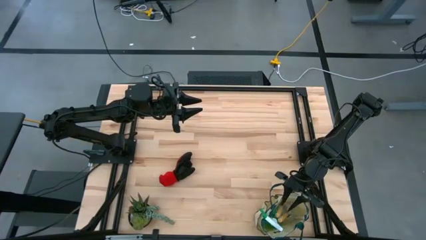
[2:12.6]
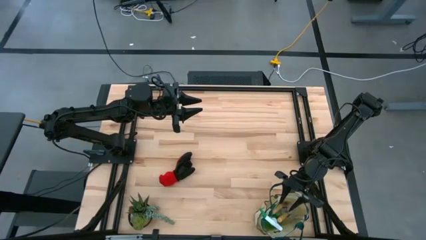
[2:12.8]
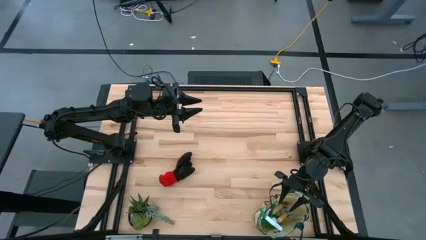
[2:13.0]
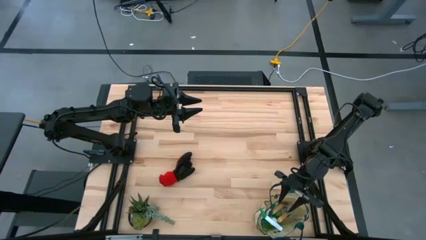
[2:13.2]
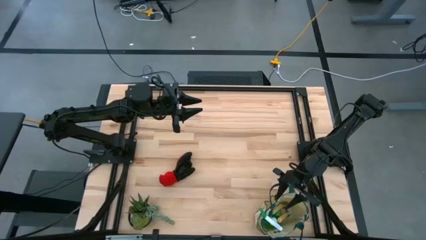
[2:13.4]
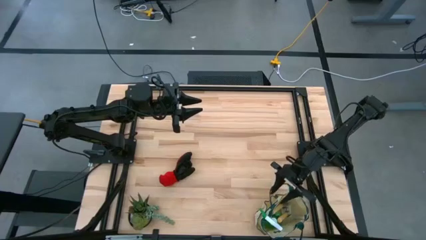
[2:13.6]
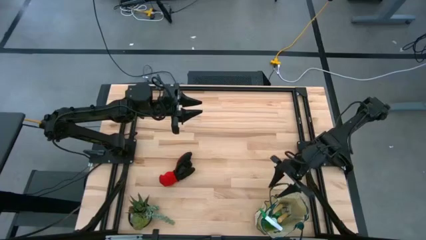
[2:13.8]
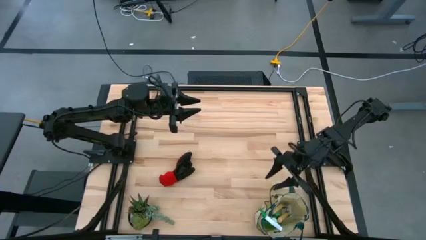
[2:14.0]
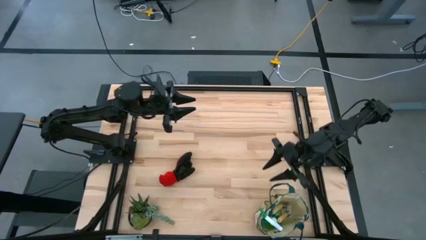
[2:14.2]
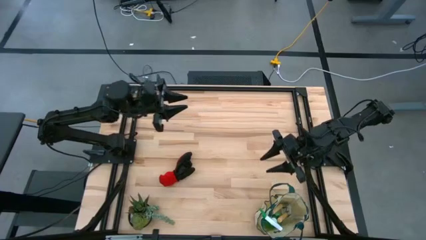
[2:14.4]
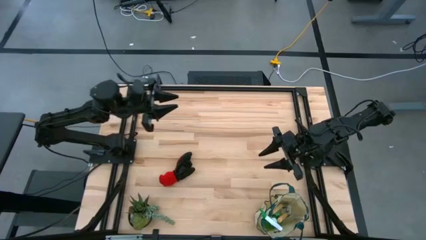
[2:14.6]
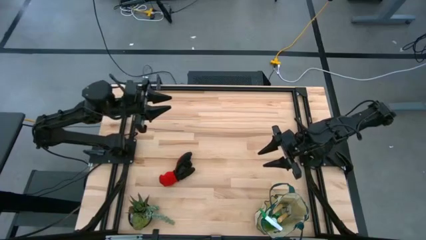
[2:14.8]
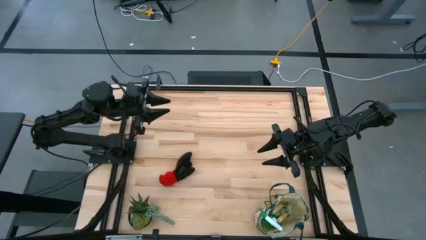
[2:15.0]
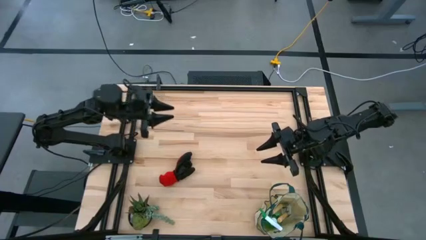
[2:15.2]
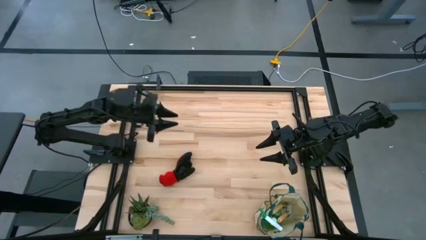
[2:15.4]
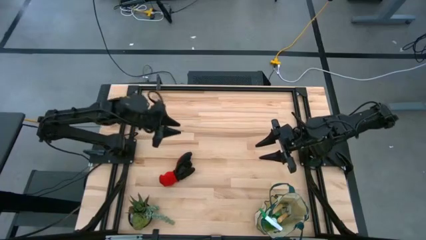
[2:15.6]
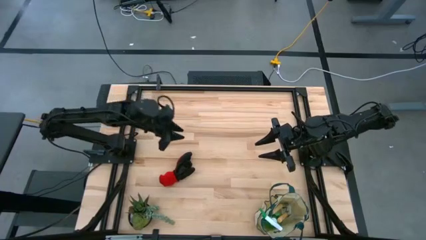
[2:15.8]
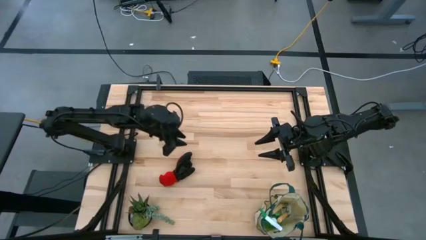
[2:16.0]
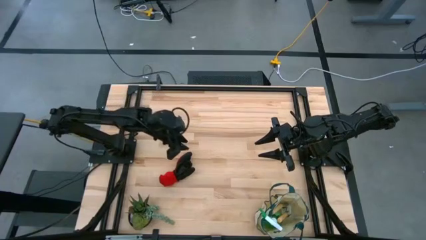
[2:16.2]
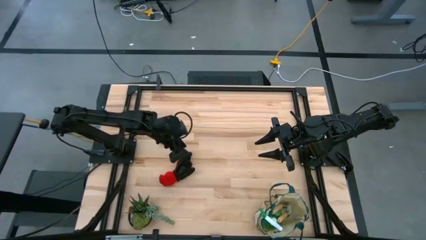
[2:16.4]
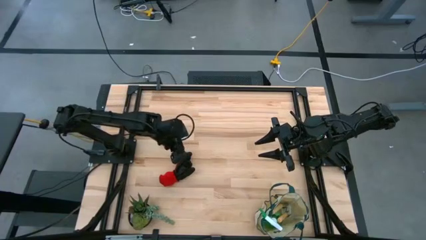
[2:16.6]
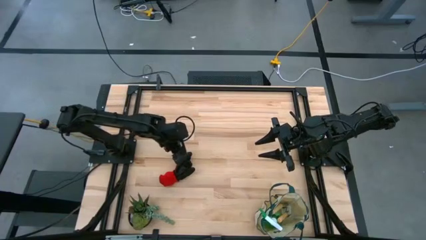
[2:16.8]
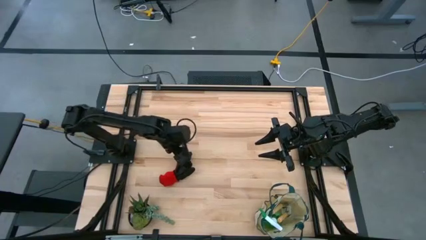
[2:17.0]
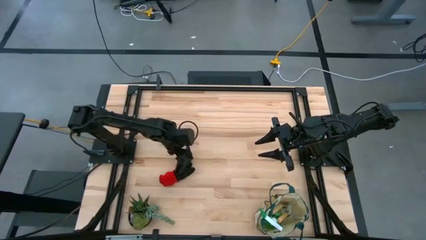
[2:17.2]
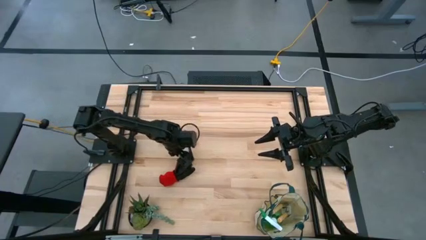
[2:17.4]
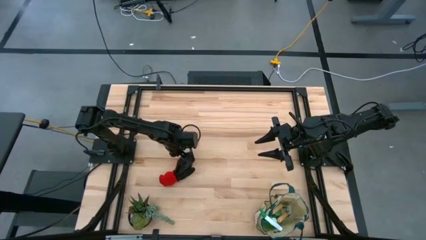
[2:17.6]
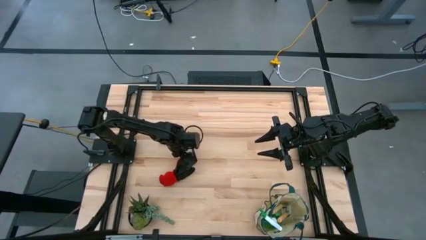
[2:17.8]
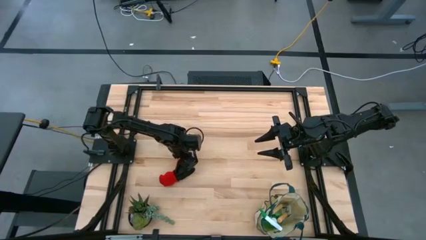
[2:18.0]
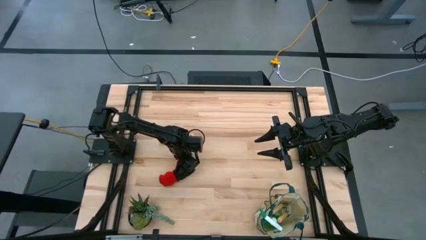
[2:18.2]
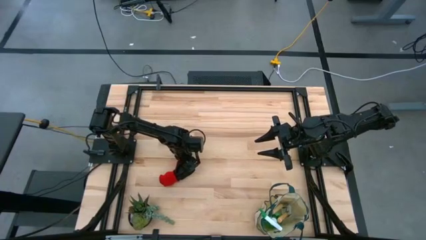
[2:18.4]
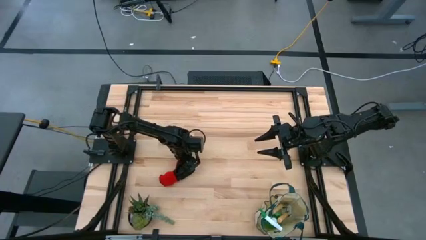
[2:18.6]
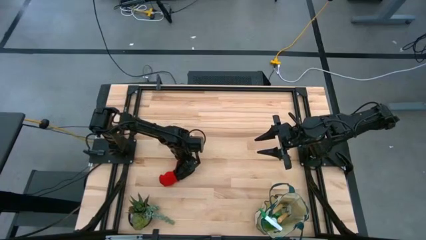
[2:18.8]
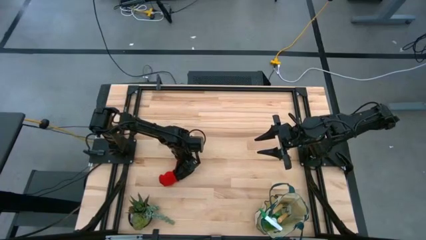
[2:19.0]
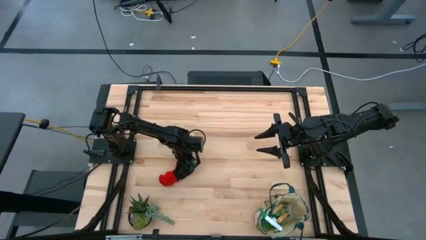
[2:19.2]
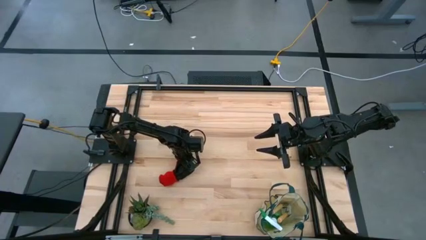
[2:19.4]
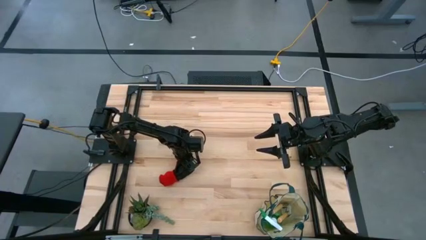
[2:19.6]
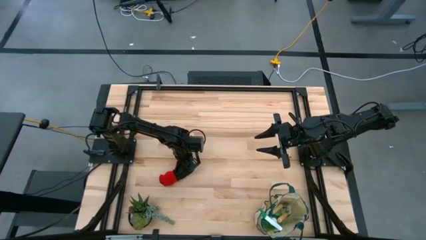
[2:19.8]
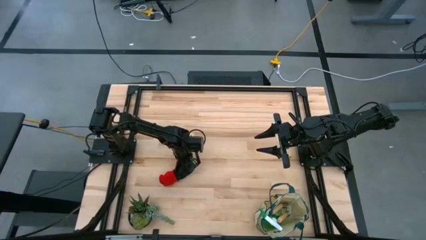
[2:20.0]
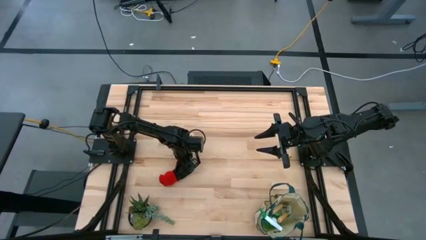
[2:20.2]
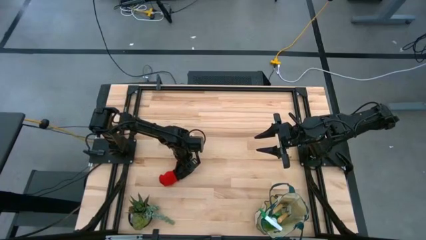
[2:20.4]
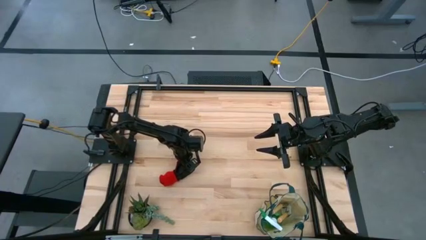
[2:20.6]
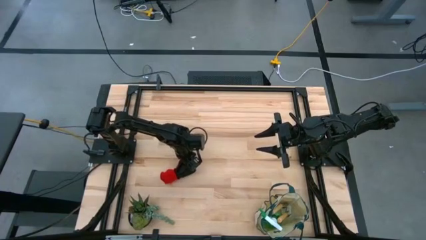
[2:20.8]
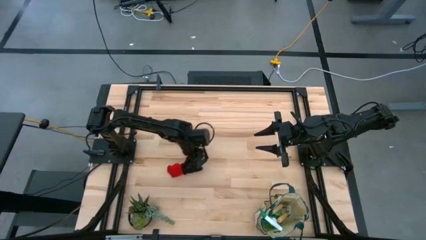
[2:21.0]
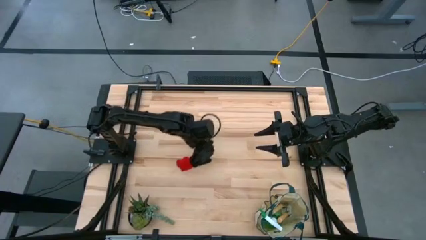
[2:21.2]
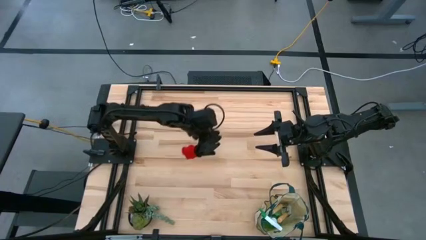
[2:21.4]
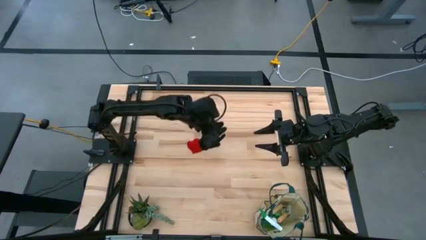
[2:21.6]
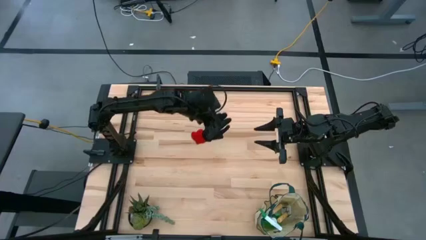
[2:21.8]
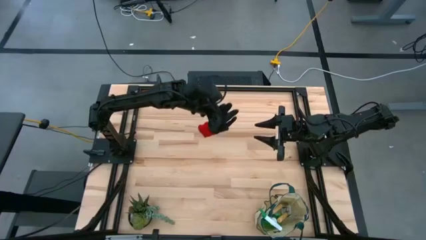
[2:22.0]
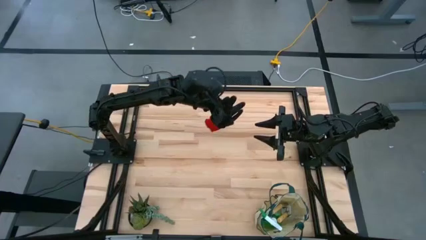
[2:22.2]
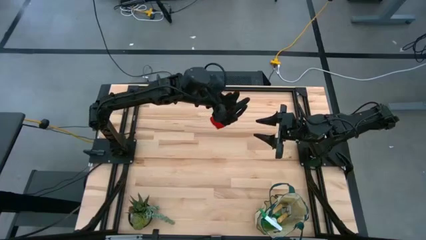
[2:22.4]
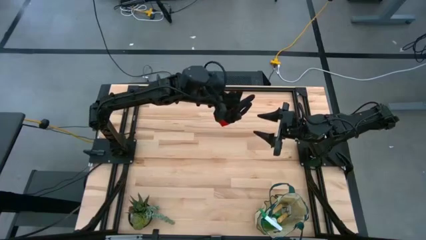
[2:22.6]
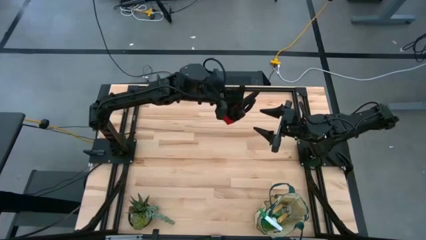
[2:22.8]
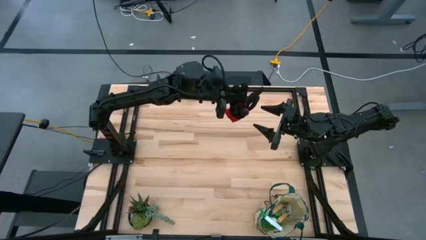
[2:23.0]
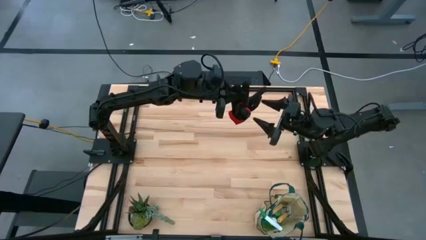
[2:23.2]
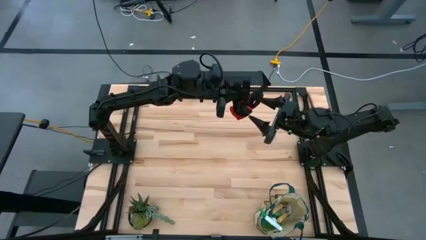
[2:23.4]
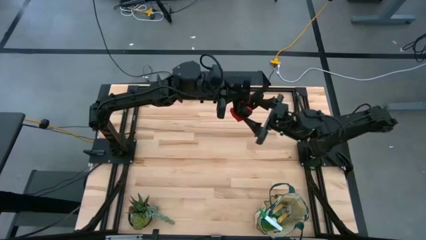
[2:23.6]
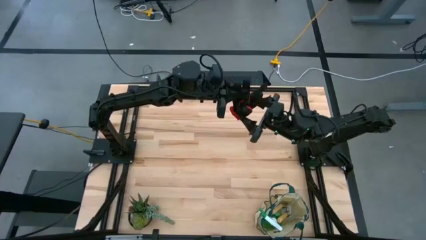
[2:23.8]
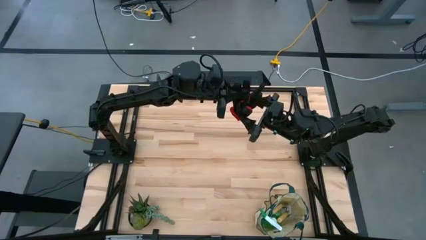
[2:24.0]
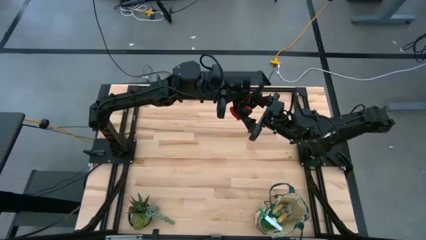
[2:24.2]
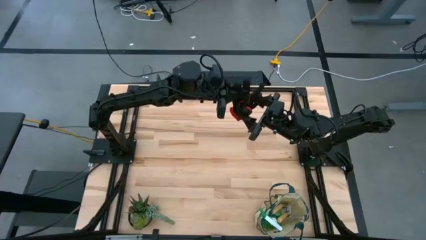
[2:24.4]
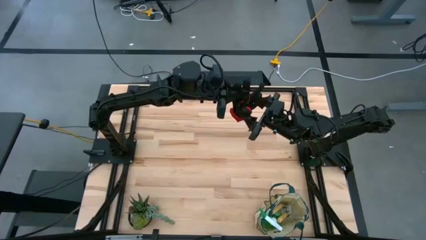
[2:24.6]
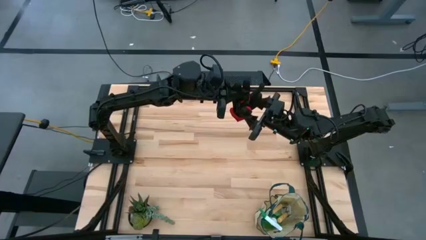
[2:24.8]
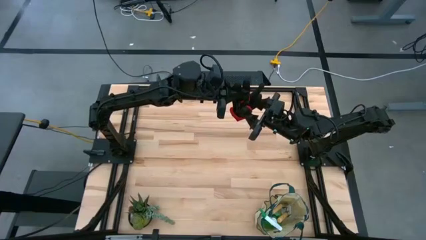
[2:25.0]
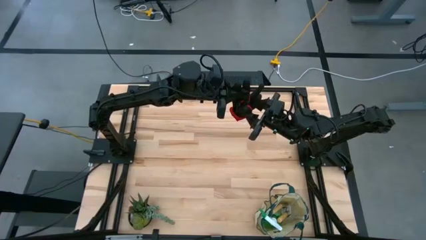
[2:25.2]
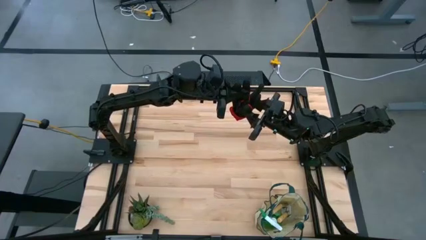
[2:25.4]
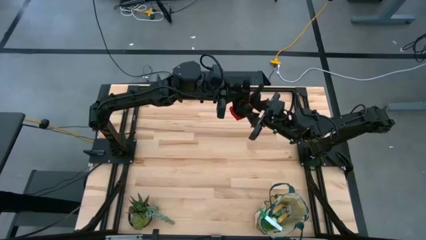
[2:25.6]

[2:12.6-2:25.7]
Task: Pick & Place Garden tools in Gardening bag
Put the black gloves into the gardening bag

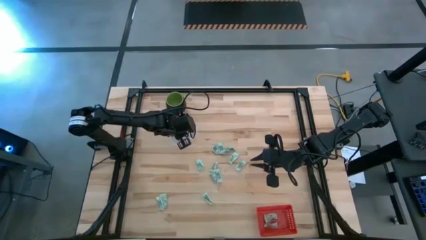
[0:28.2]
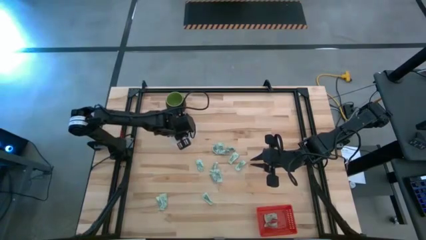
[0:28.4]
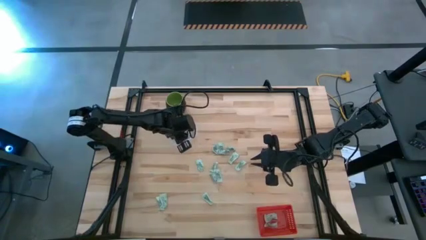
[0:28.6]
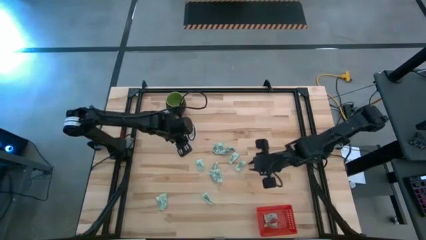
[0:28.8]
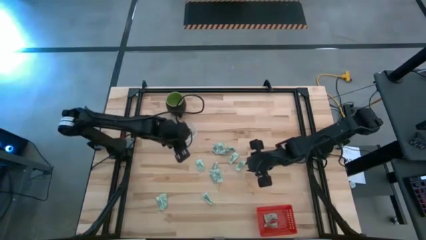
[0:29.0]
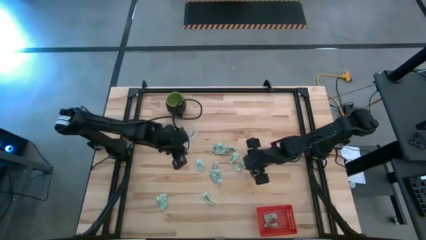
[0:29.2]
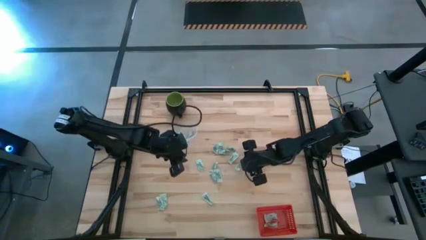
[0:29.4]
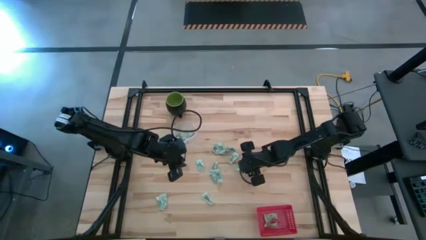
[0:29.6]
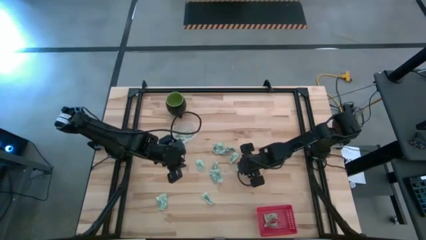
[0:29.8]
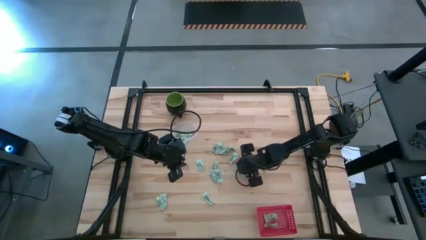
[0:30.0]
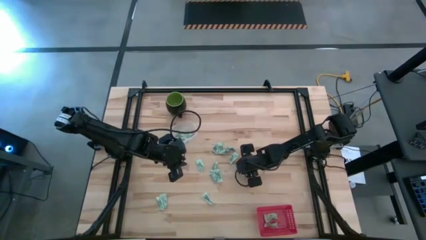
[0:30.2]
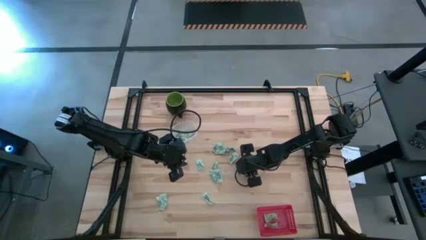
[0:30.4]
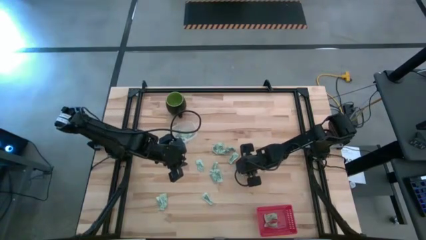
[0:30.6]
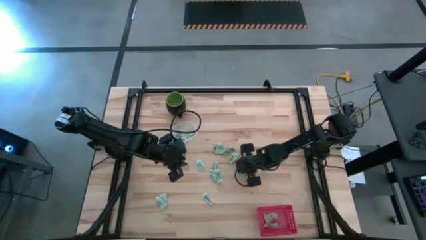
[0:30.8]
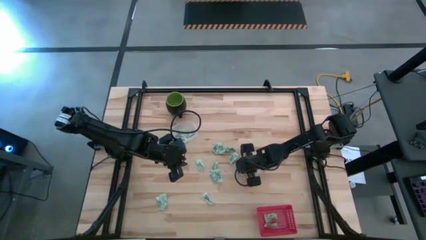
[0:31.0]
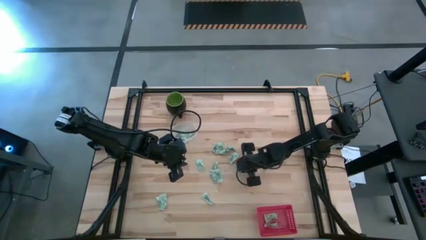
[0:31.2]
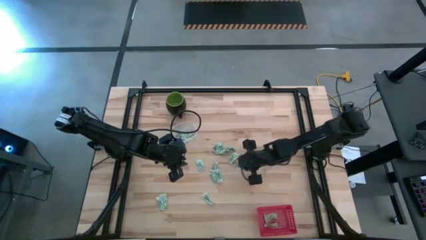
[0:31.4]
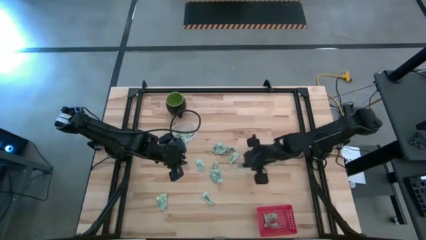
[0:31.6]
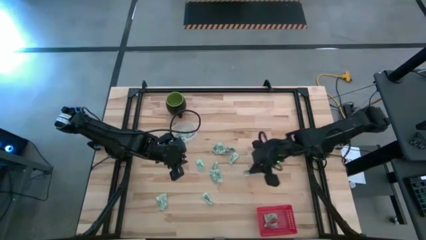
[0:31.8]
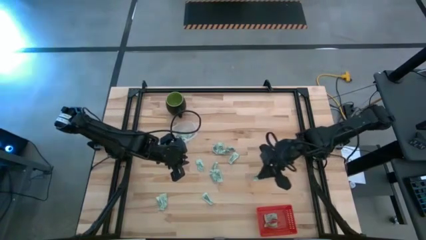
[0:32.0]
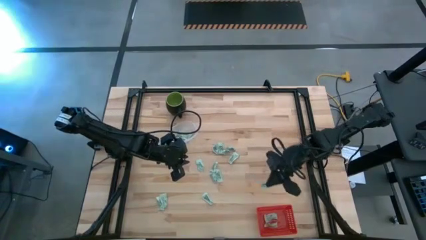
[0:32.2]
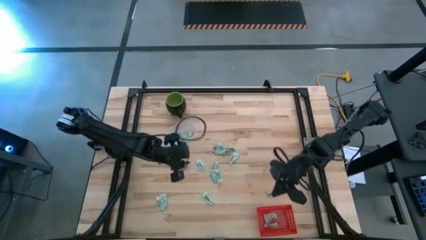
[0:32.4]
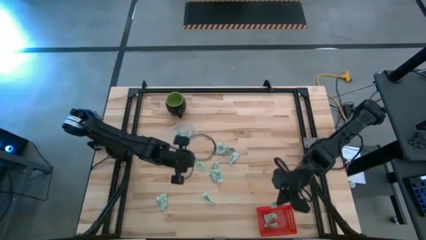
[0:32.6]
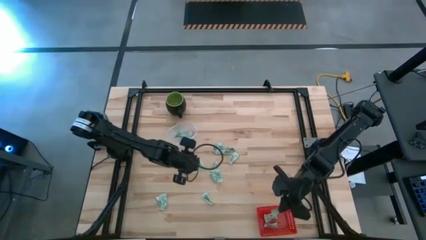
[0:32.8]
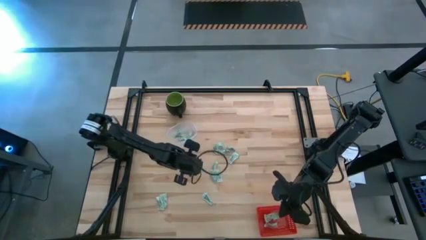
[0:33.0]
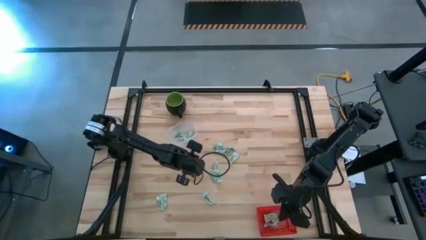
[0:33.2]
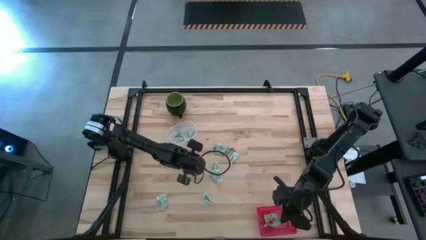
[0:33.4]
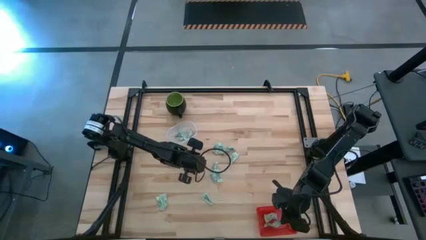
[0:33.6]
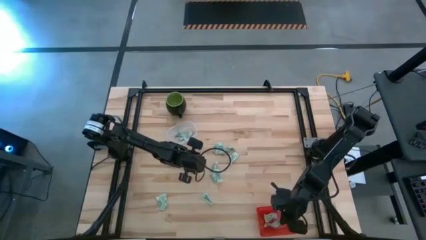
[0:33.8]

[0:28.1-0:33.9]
Task: Pick and place items into bin
Put the green stevia packet into the red basket
